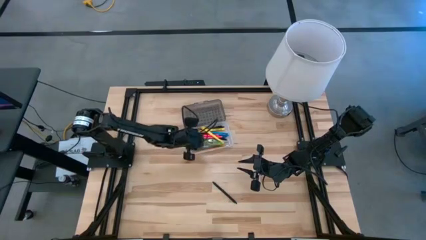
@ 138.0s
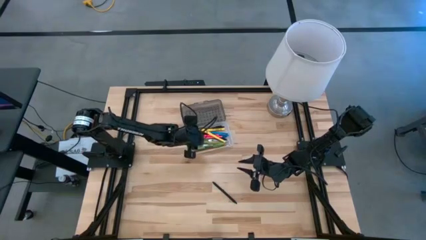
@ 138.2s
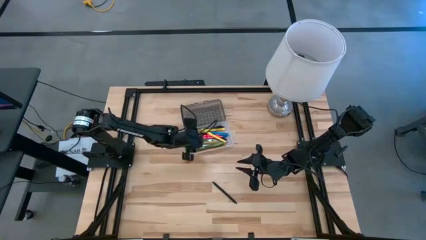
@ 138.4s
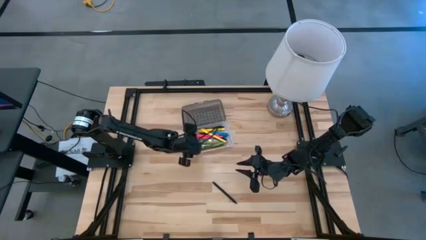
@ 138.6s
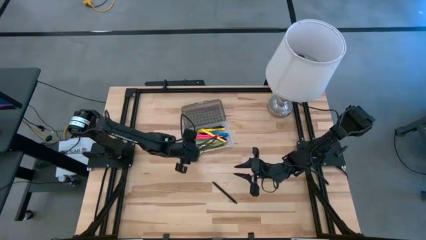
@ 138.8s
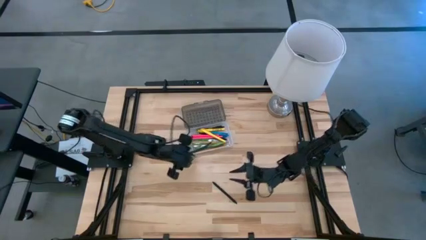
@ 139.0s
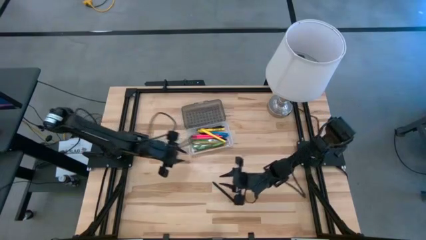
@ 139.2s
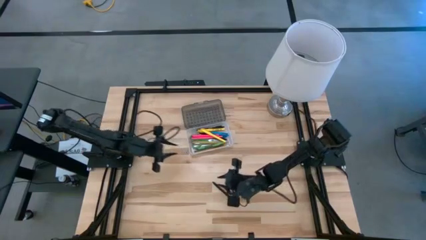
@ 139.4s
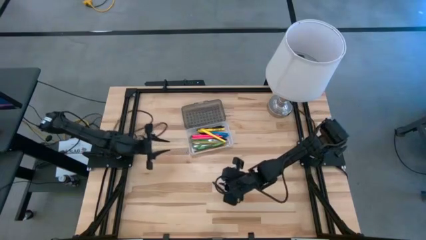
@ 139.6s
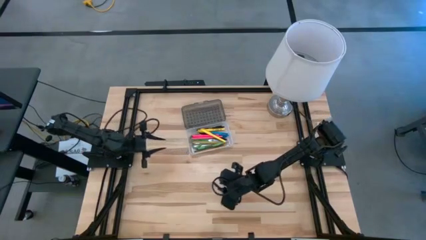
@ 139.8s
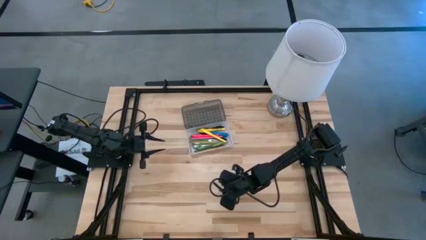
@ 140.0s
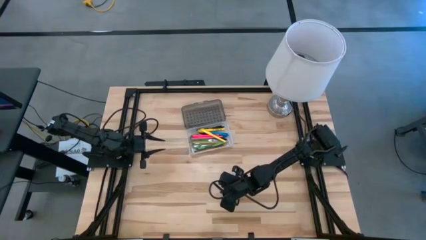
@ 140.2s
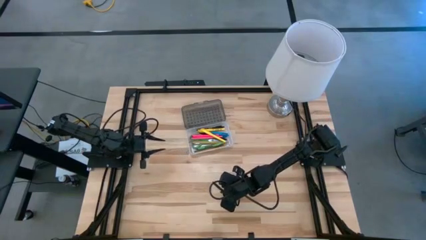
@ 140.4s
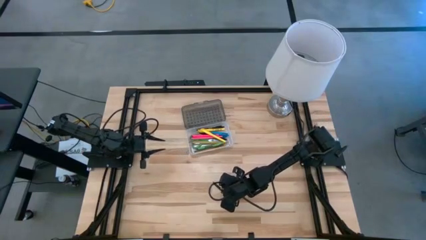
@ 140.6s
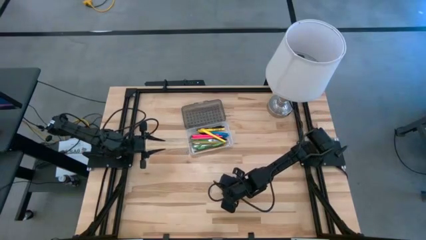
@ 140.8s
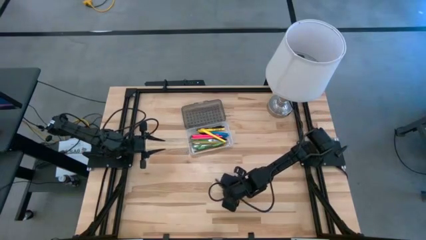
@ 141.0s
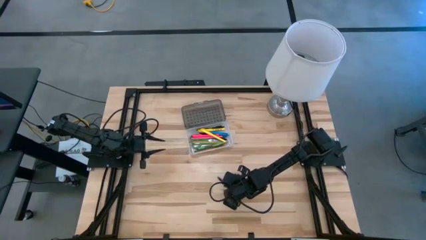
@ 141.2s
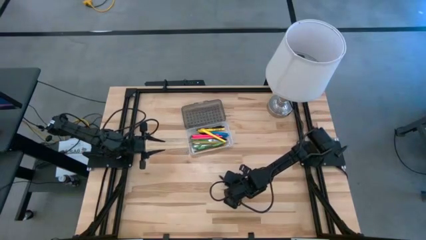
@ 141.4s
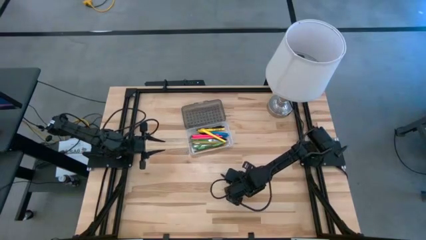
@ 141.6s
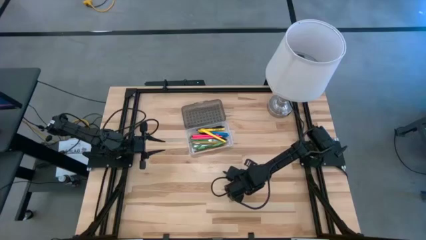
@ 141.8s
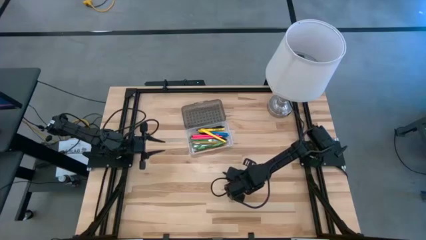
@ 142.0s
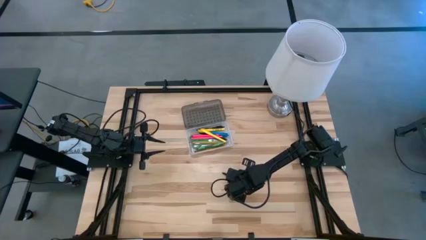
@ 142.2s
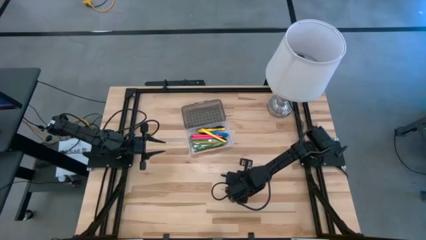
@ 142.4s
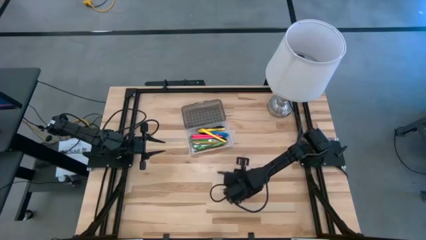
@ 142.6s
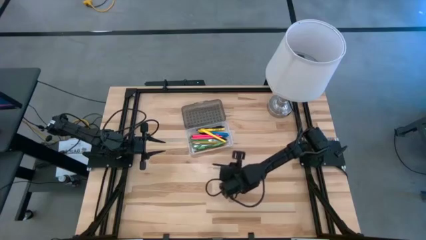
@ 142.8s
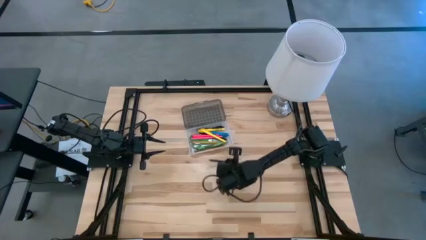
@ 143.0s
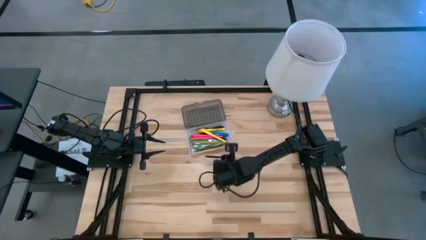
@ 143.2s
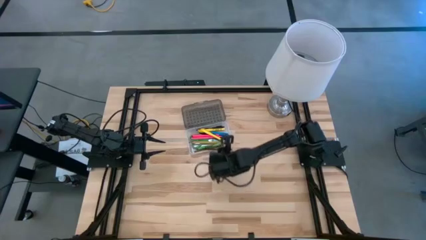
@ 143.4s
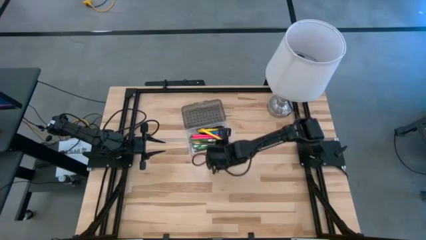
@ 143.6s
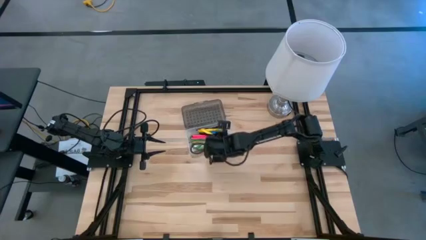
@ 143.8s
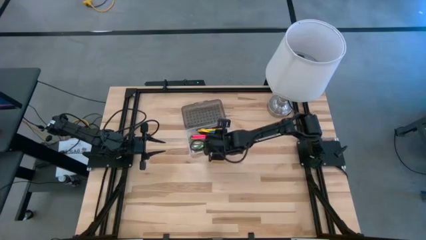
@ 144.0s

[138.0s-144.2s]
Task: Pick & place school supplies into a supply box
Put the black pen into the transparent supply box

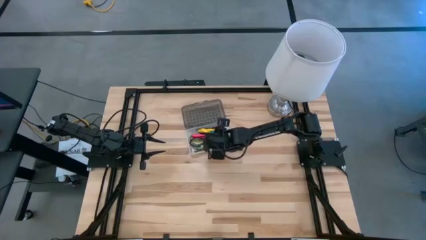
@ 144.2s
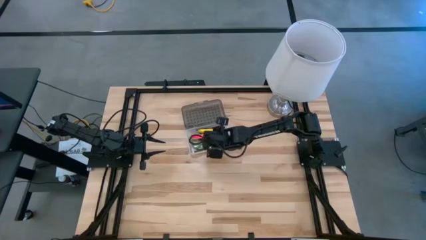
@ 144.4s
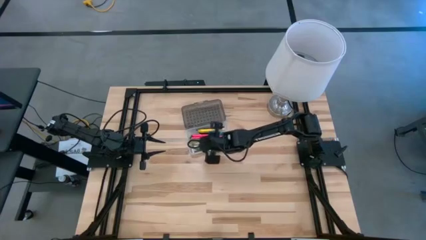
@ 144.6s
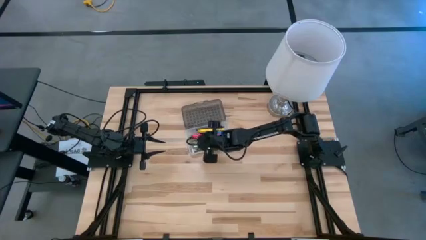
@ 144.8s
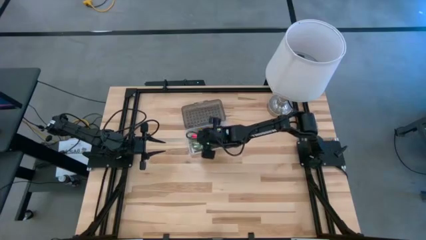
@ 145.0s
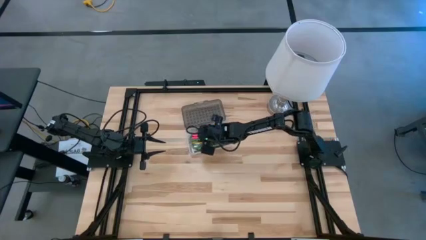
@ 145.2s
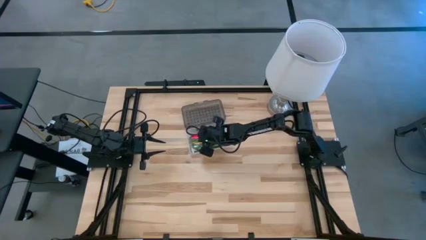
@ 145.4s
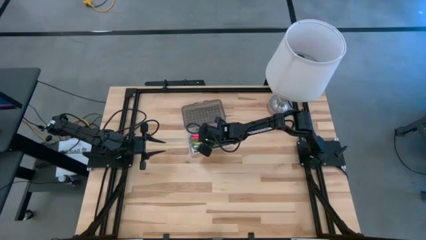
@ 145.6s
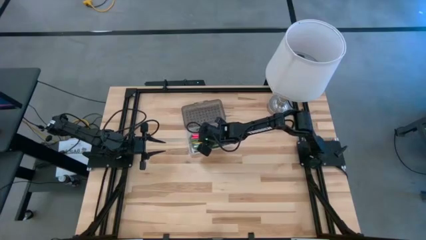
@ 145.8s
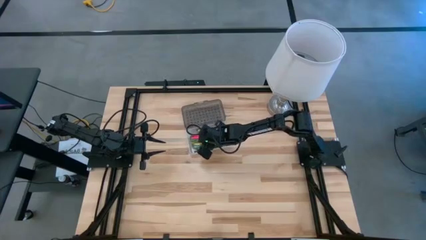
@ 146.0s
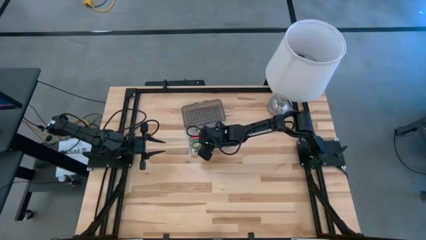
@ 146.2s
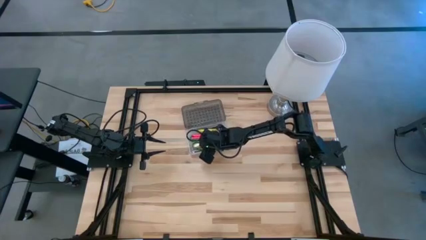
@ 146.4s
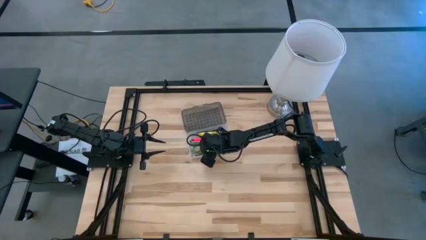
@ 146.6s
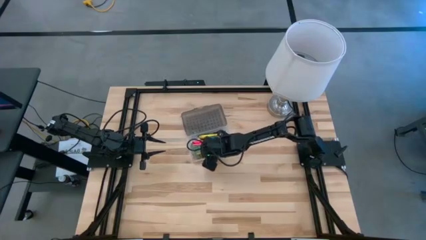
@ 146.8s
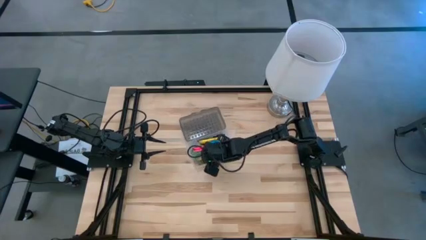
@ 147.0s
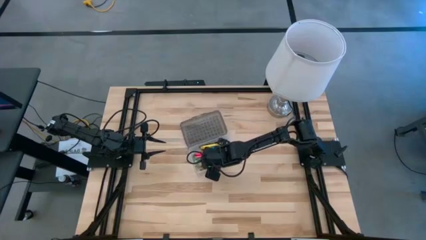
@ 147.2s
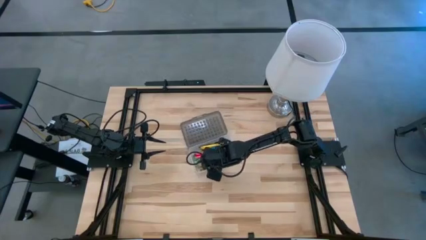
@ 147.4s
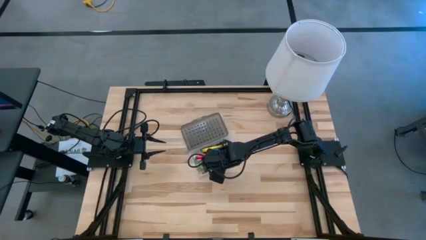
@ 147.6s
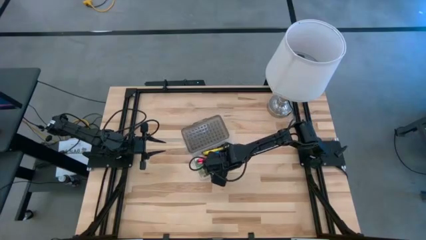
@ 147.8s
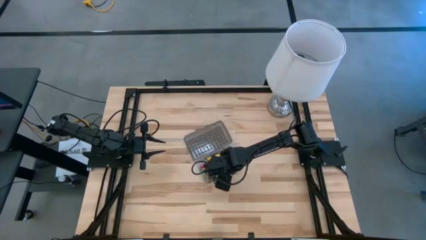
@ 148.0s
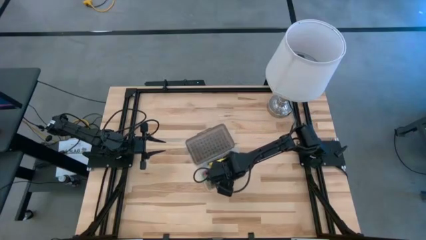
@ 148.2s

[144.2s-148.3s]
Move the transparent supply box to the center of the table

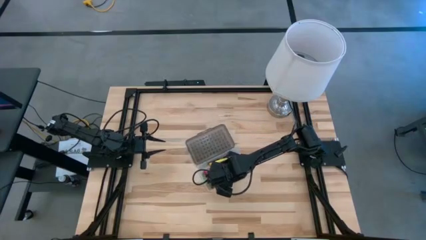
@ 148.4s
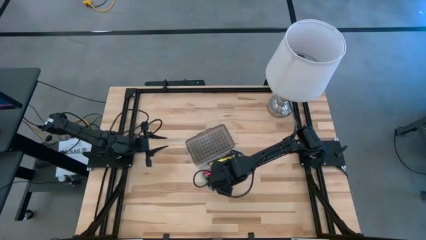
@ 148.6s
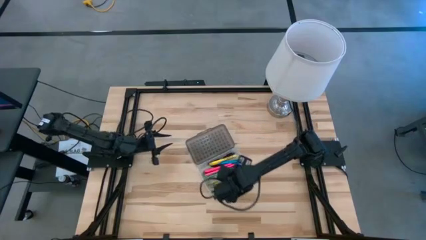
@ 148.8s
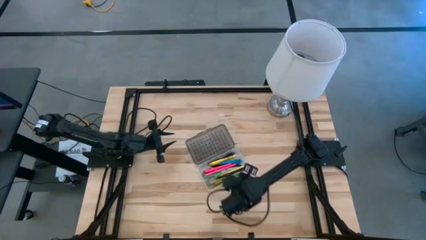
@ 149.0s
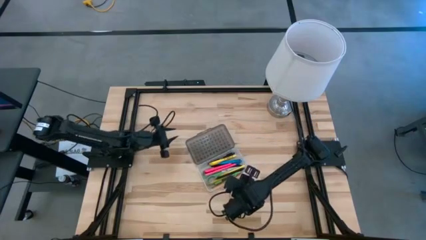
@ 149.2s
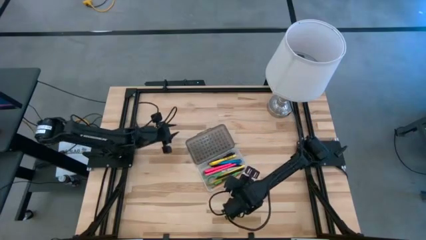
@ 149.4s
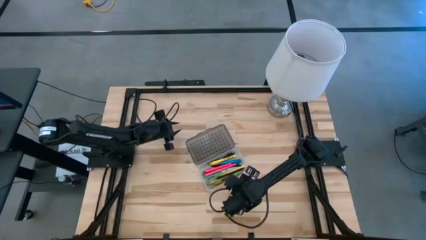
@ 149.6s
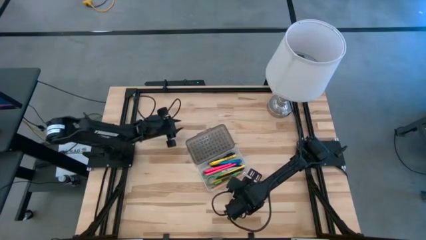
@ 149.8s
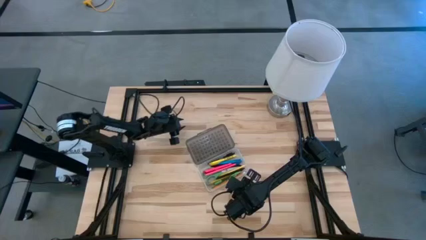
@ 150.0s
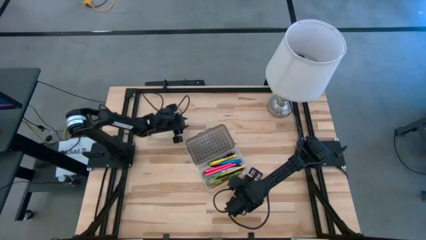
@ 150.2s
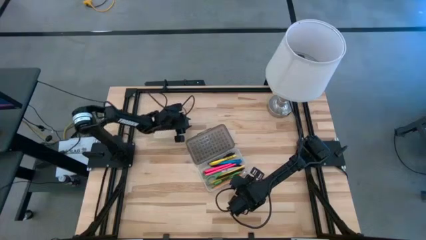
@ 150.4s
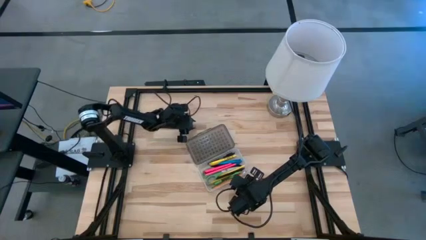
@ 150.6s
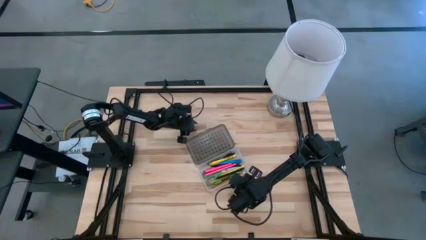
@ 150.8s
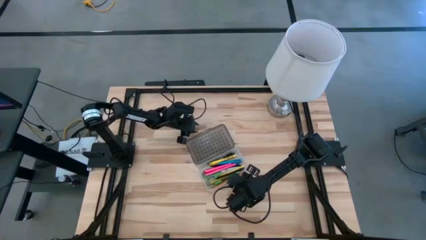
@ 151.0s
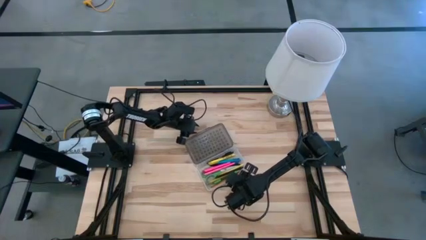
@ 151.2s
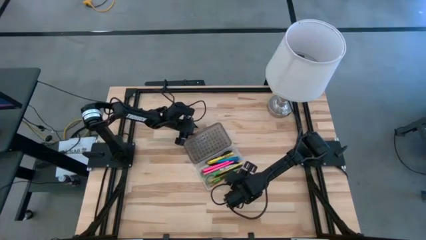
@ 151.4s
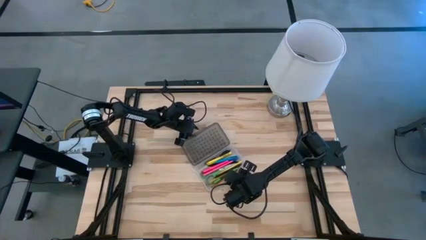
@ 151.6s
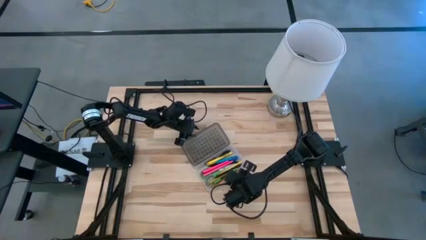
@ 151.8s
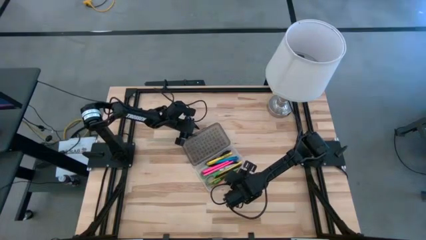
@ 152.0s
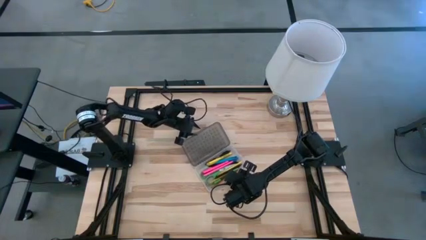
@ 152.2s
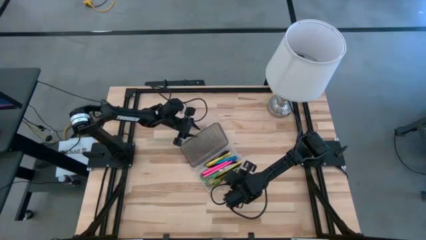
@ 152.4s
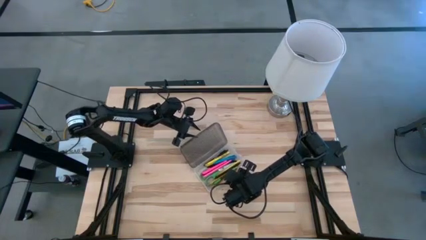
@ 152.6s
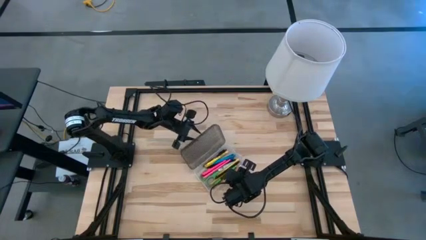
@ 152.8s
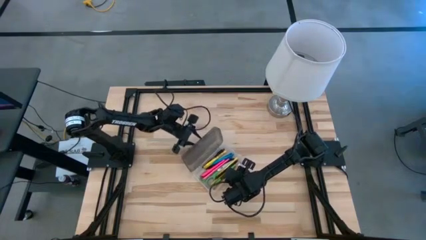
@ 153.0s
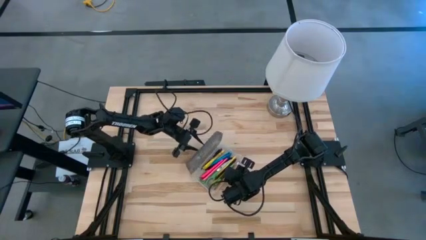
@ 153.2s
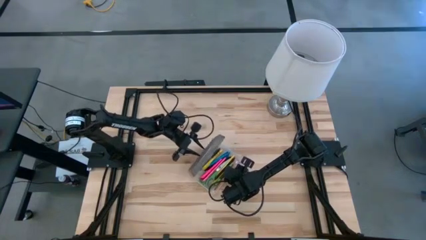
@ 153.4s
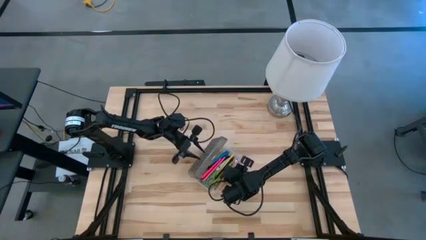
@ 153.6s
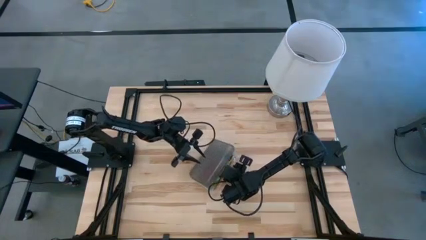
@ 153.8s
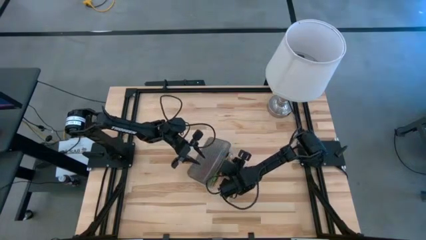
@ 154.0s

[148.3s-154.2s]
Close the transparent supply box
